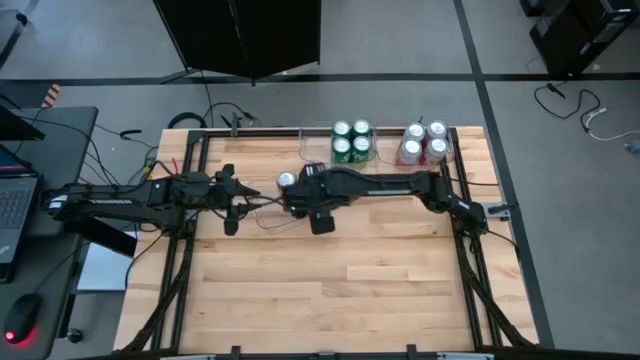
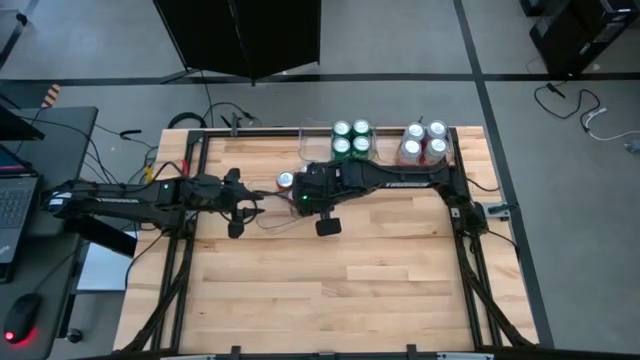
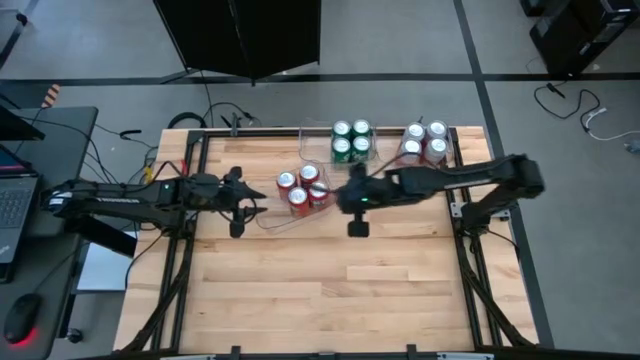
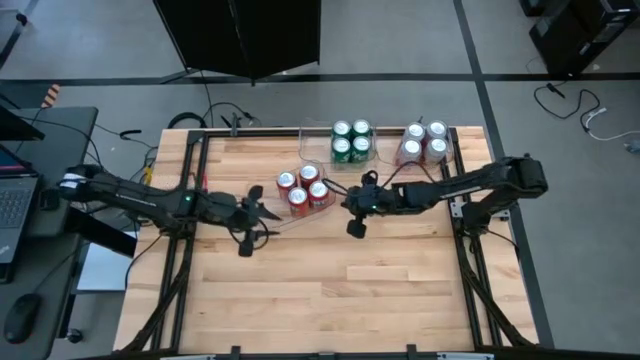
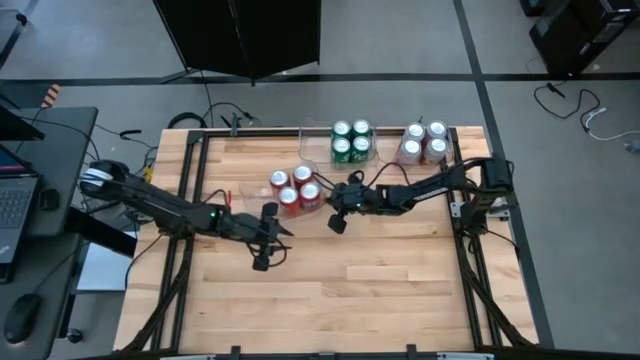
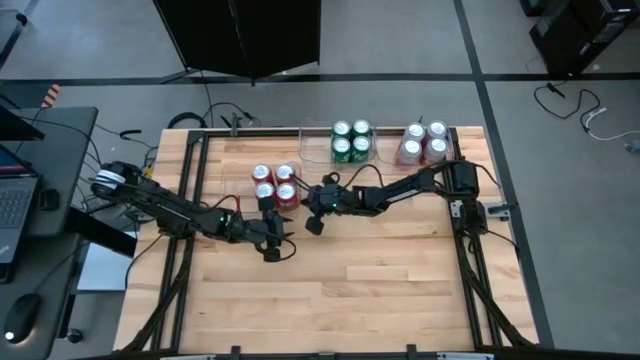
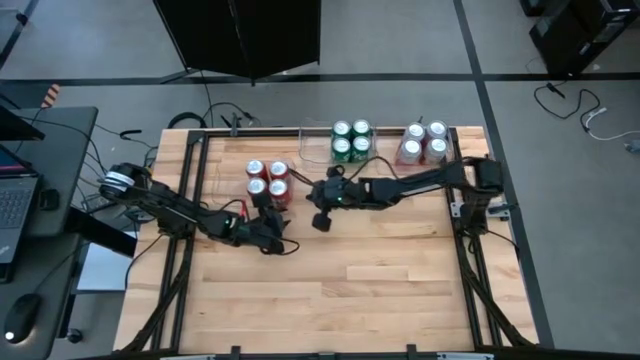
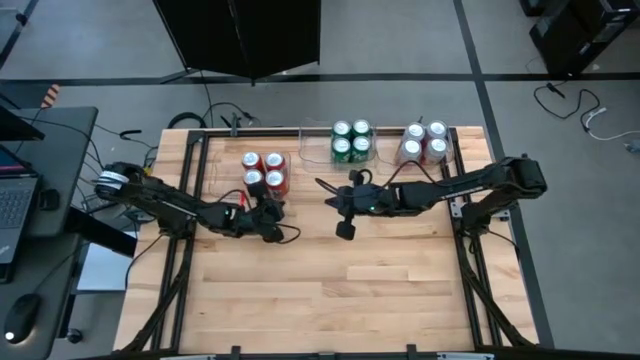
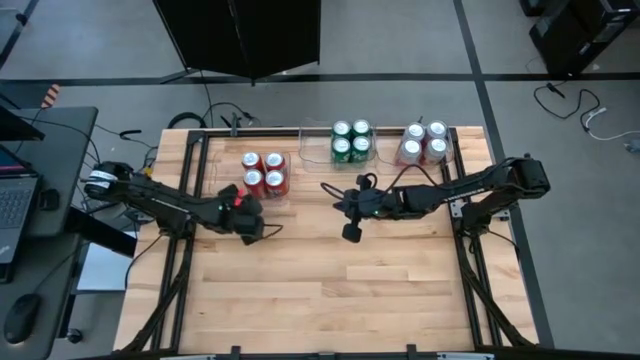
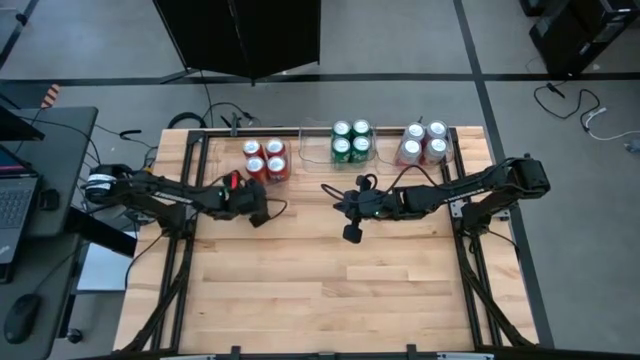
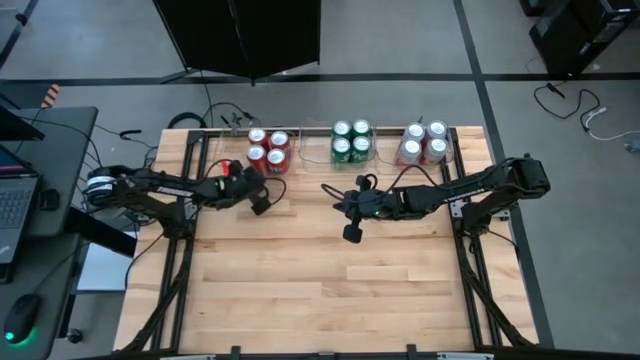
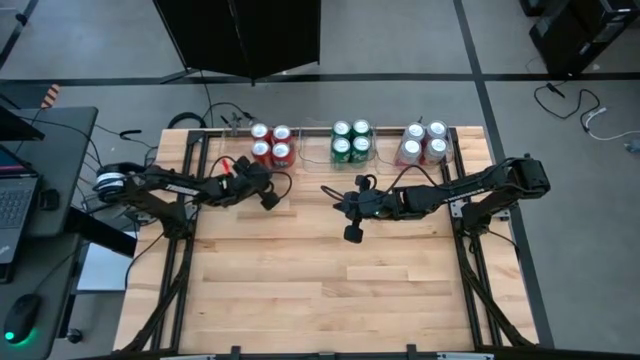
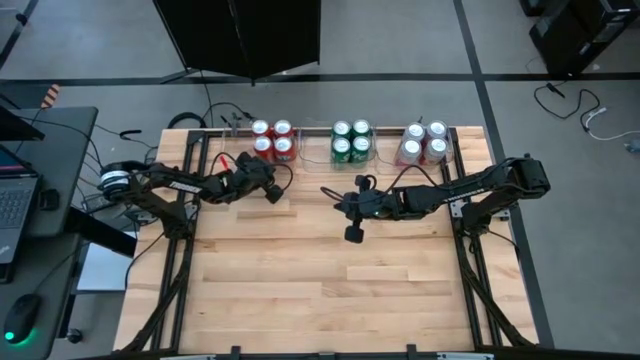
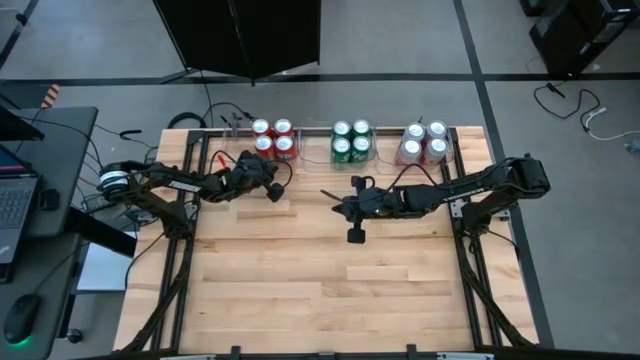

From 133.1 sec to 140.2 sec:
Task: Sort soda cans
Move the bottom transparent bin from the middle to the top left of the table

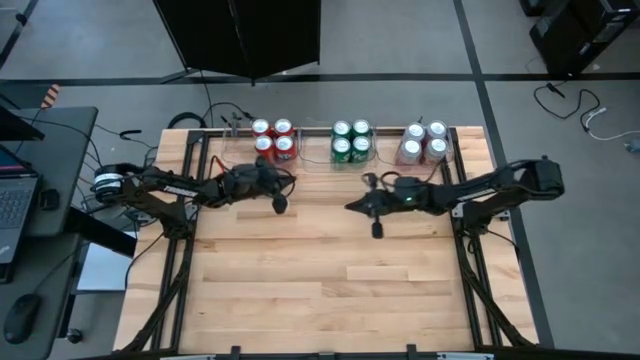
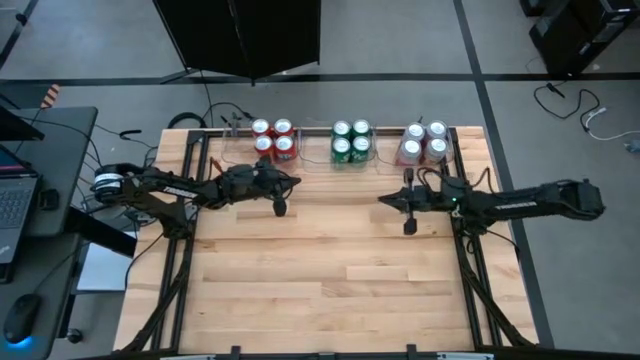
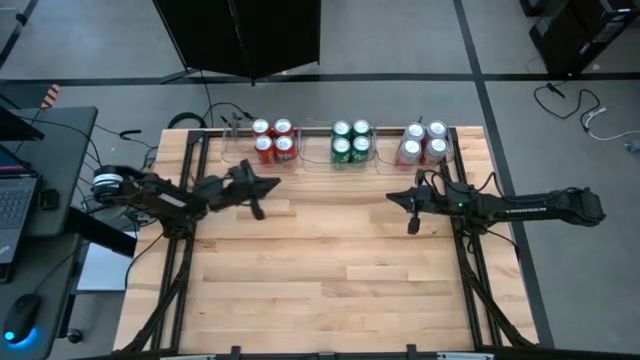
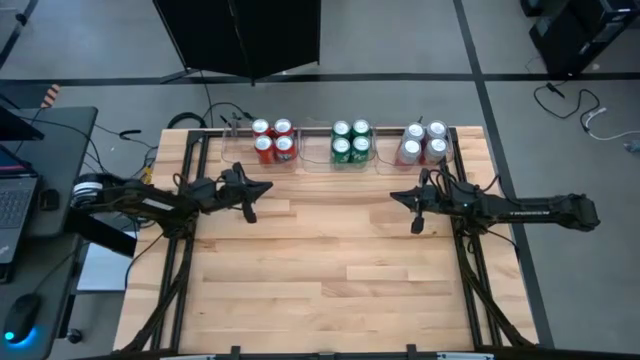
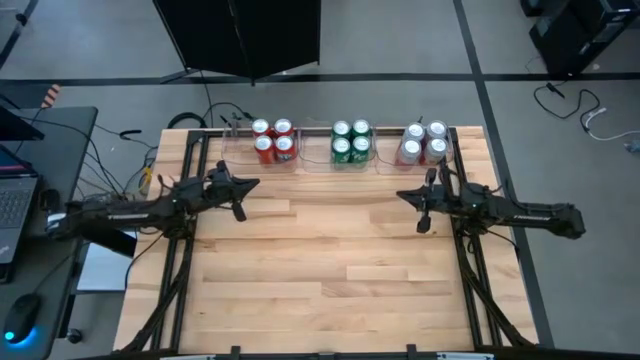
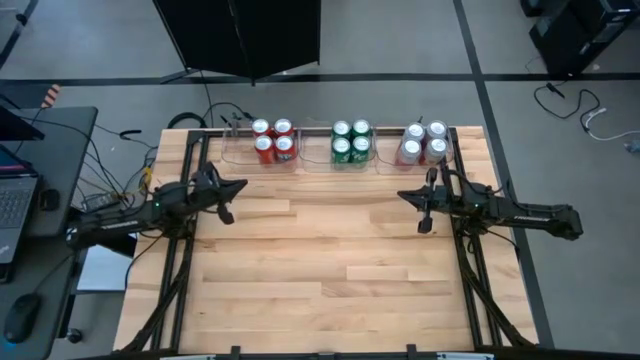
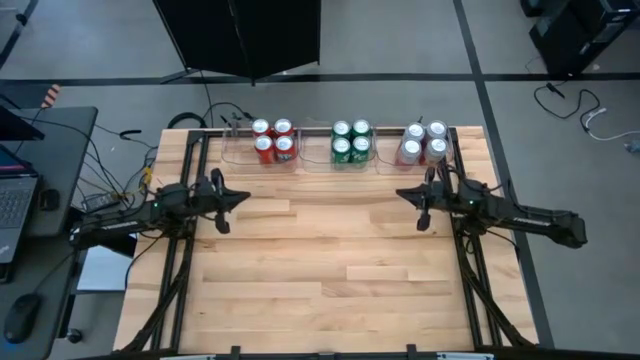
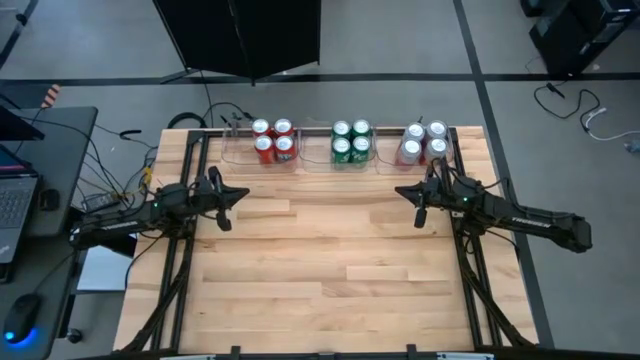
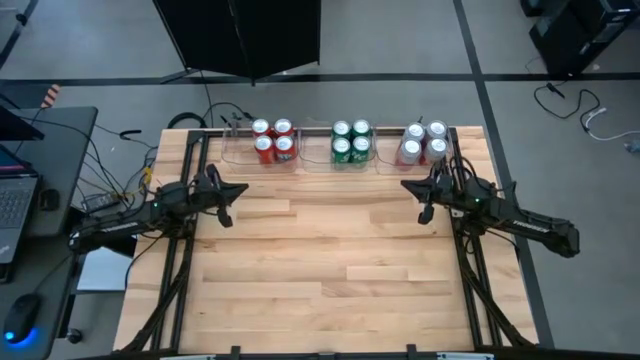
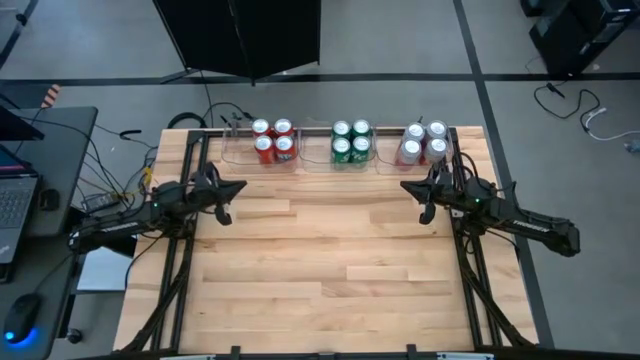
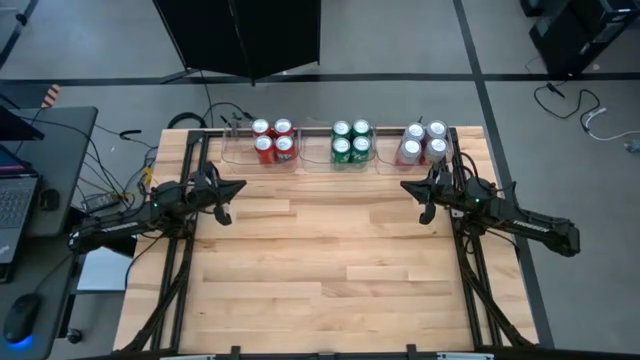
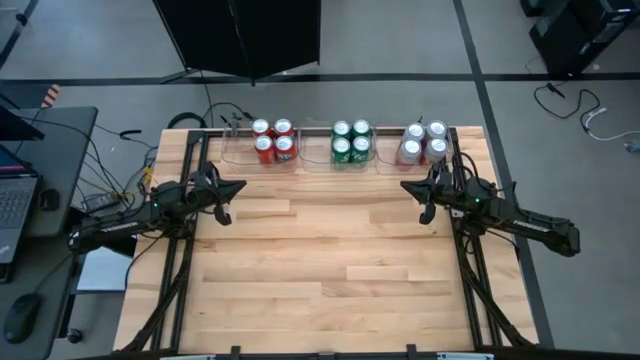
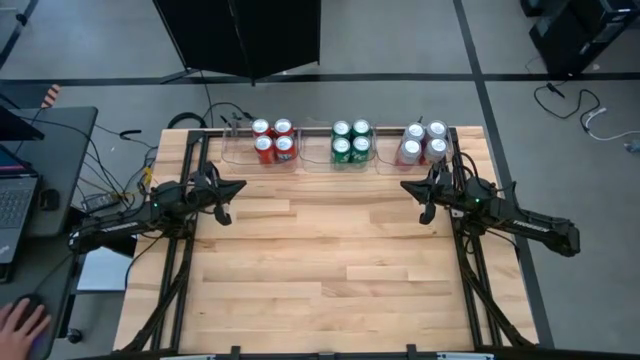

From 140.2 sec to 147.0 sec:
Return to Home Position

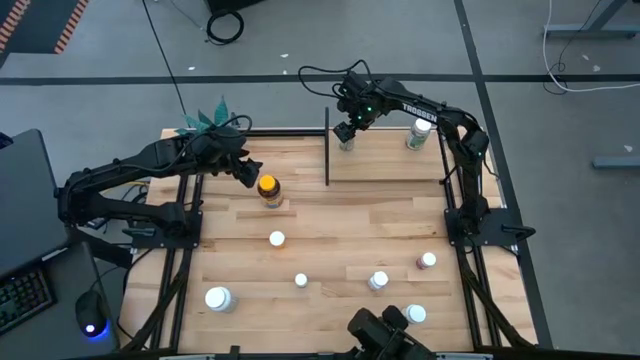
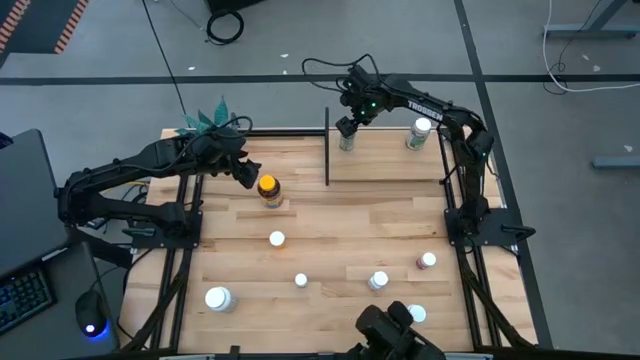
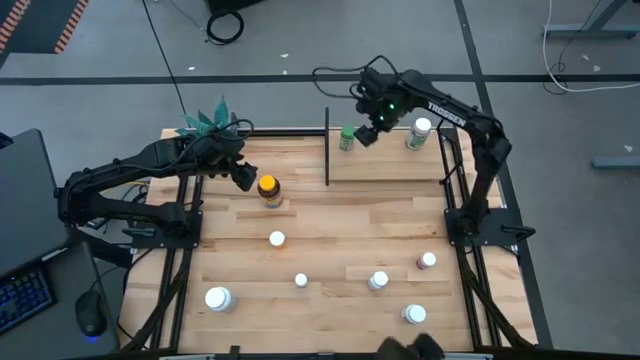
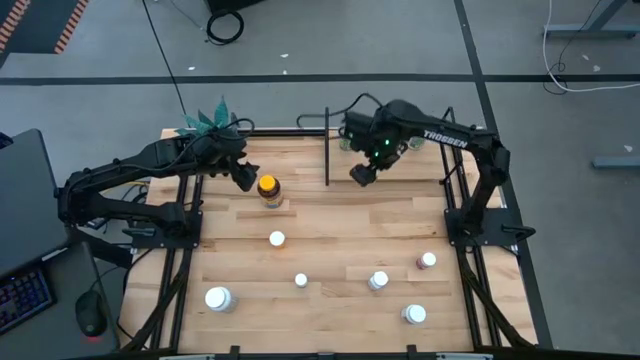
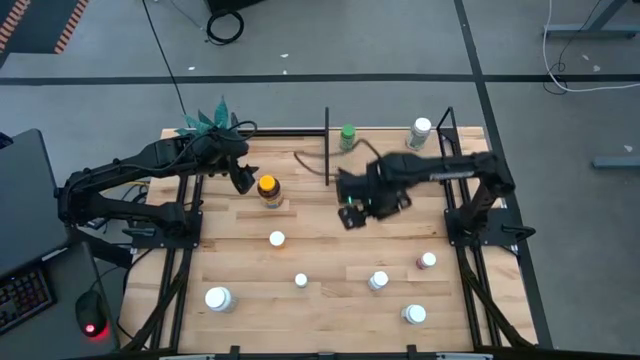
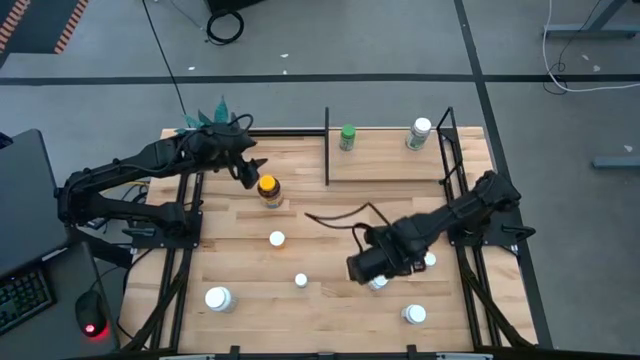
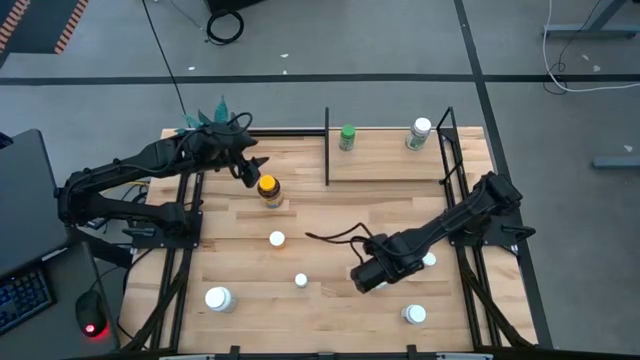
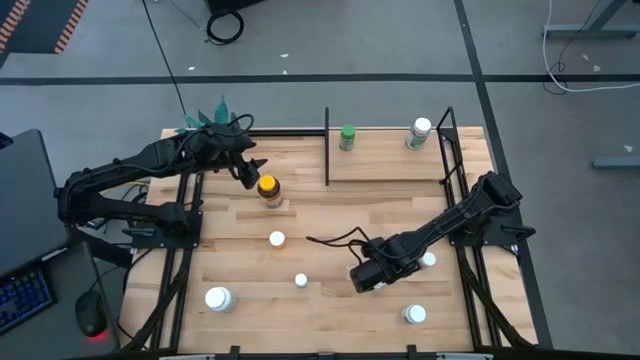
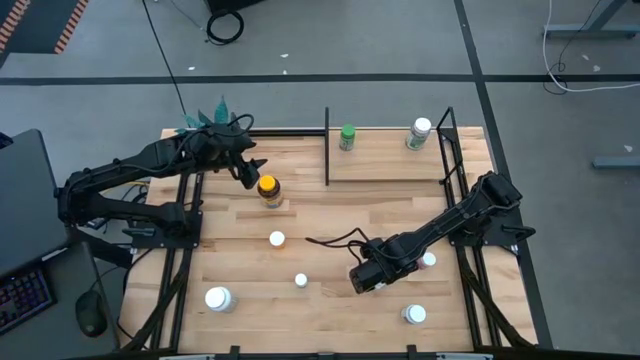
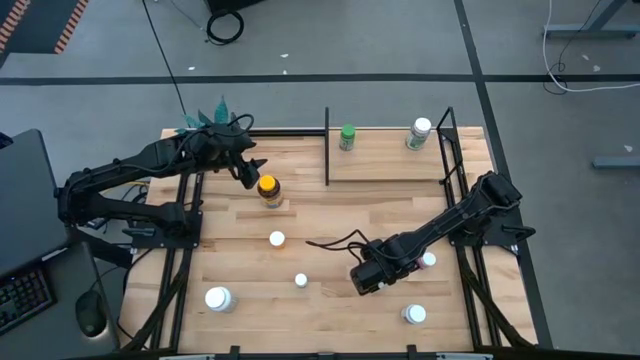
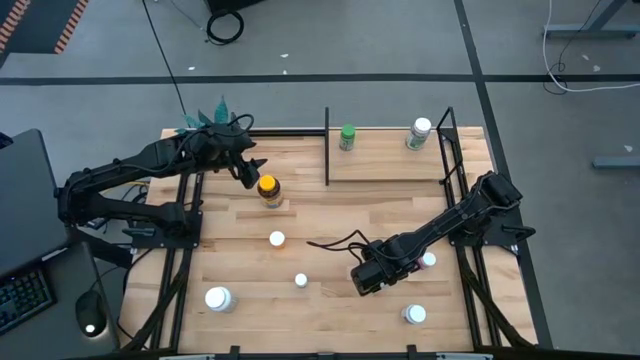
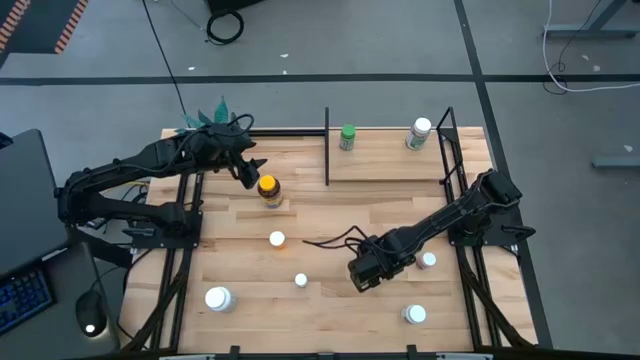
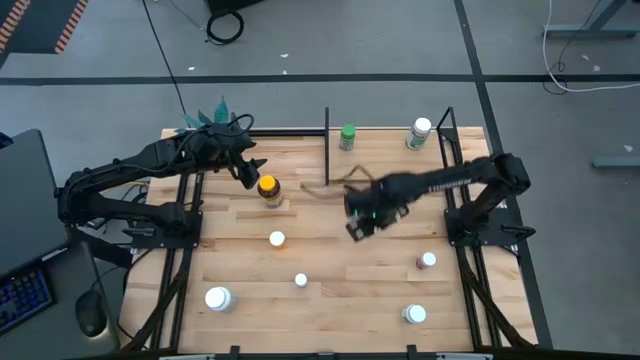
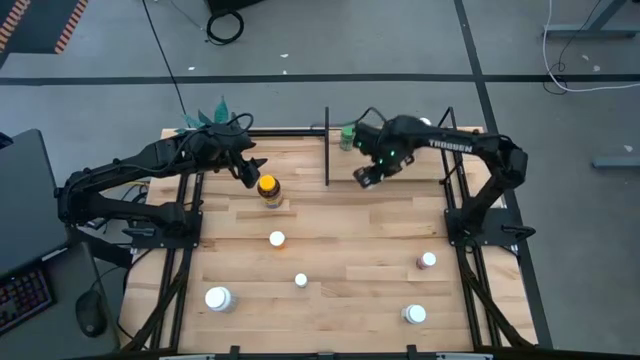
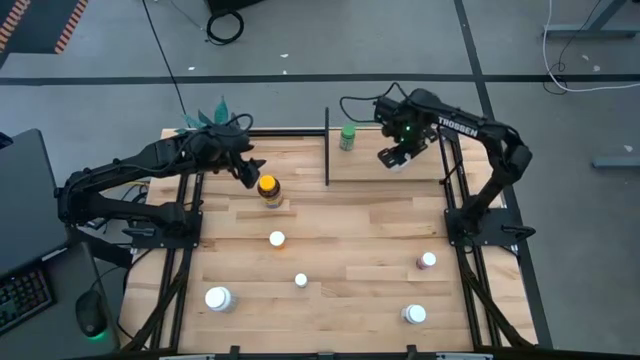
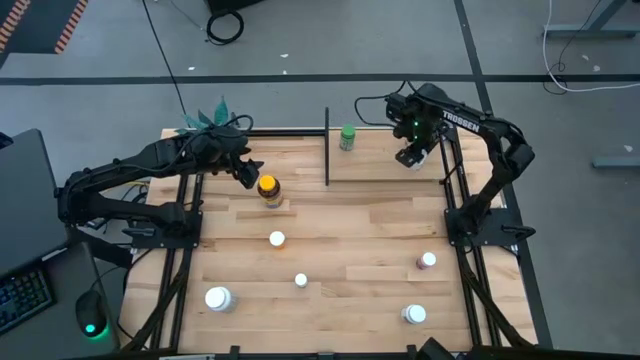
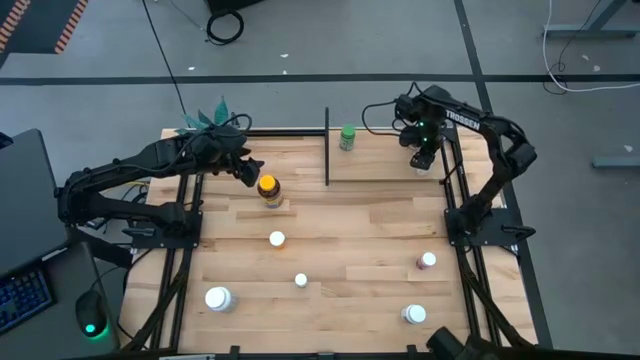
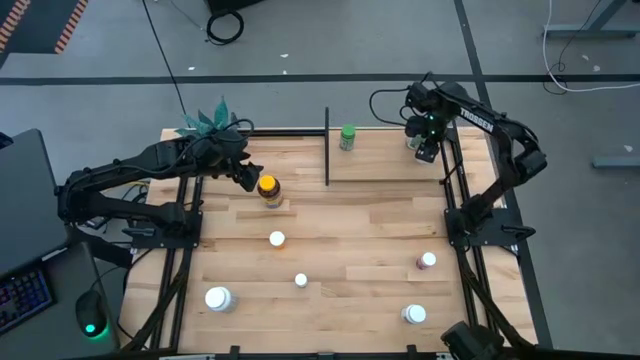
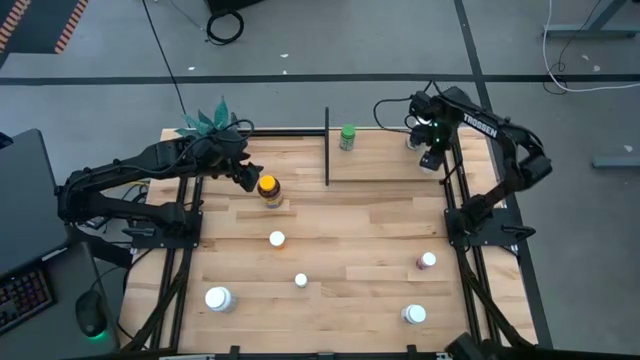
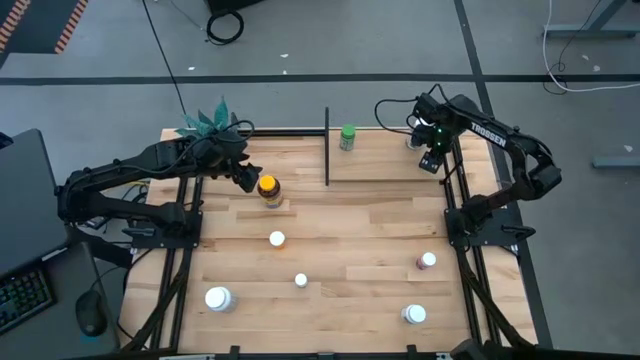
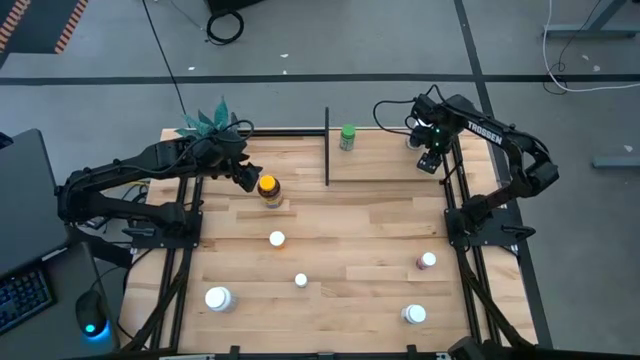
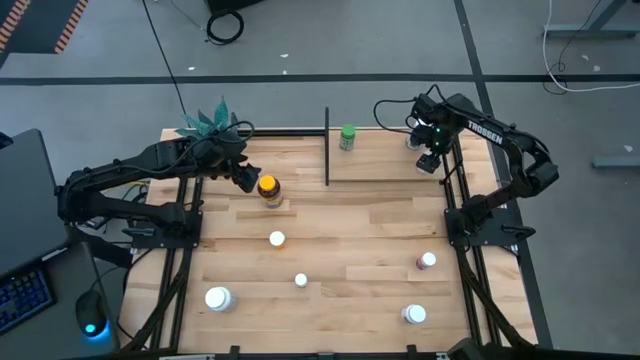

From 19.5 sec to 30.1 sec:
Task: Pick and place medicine bottles onto shelf by color
Put the white and blue pill bottle on the shelf
